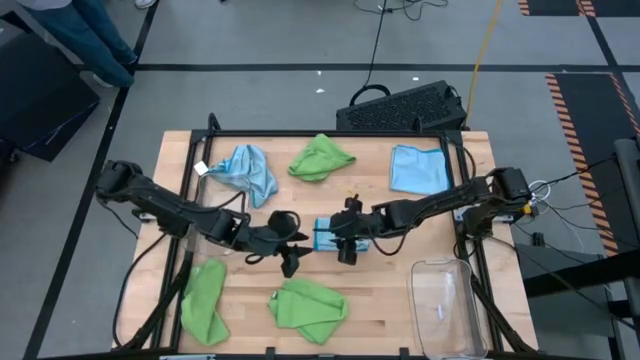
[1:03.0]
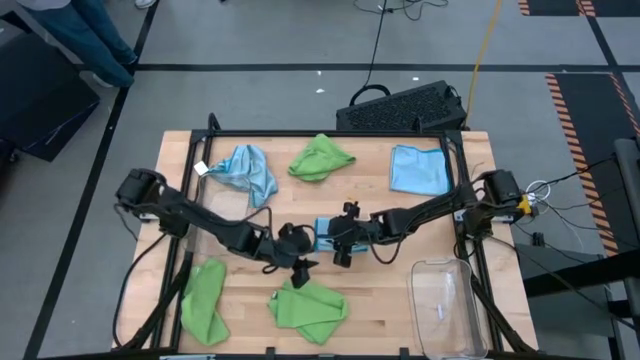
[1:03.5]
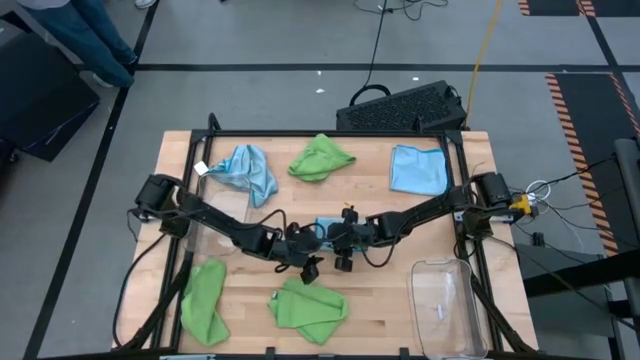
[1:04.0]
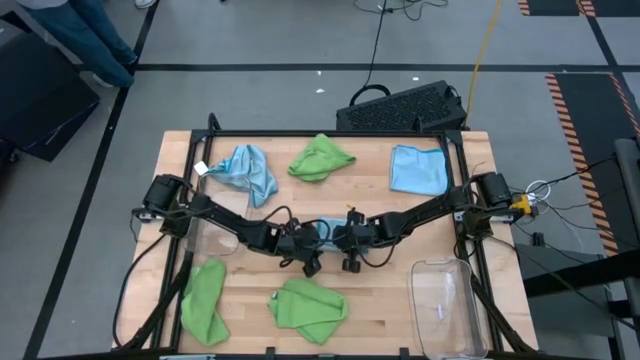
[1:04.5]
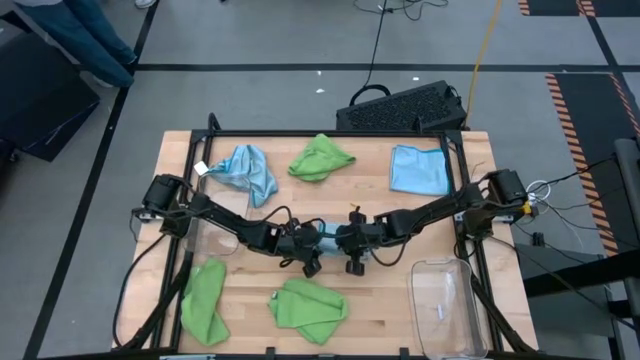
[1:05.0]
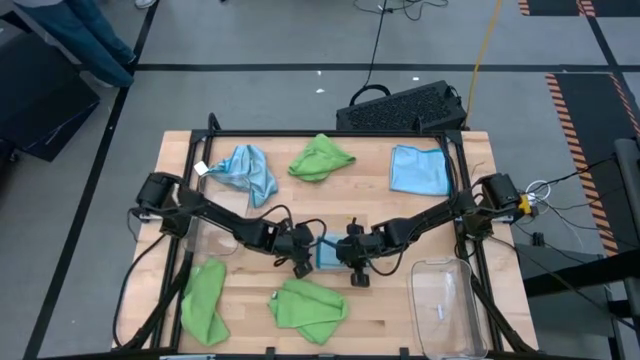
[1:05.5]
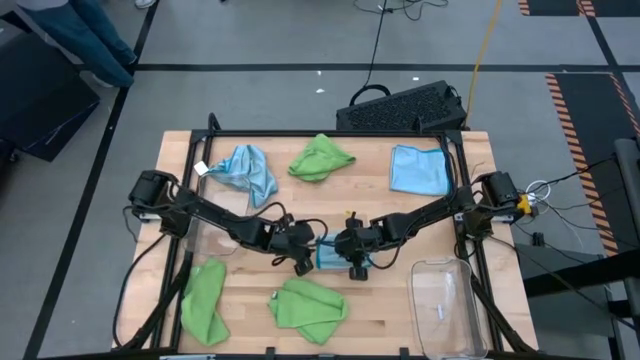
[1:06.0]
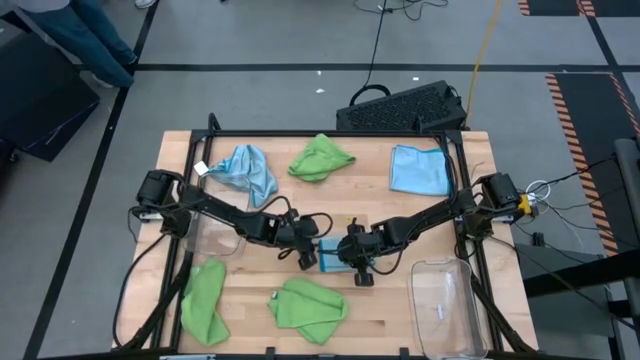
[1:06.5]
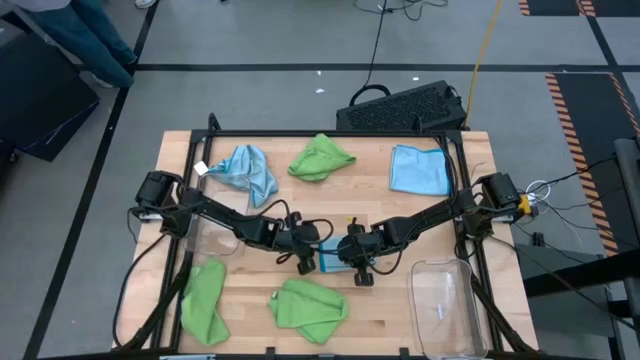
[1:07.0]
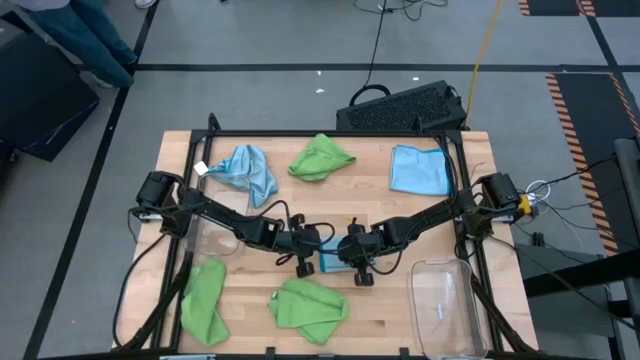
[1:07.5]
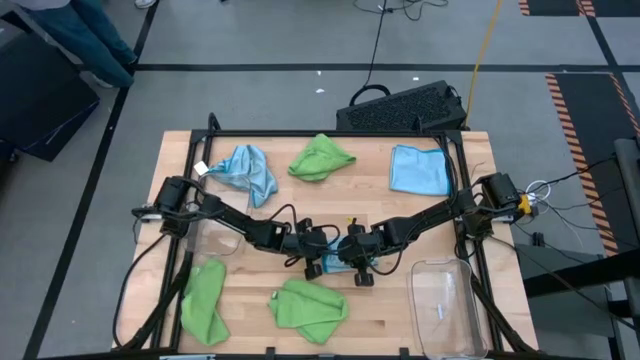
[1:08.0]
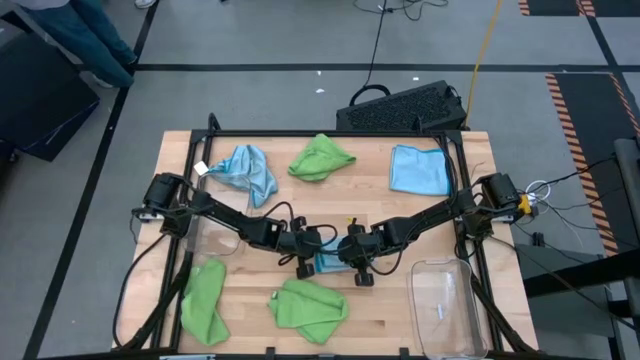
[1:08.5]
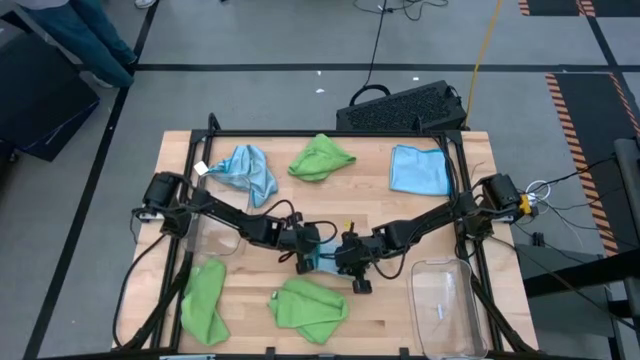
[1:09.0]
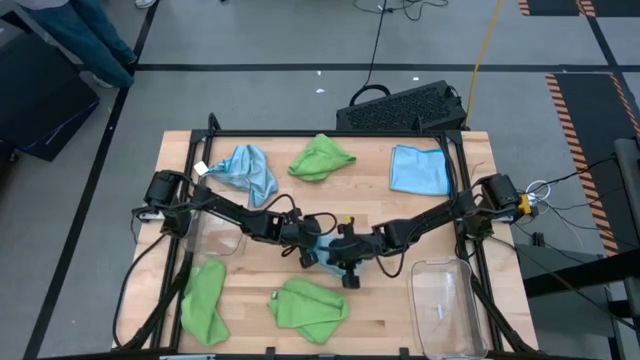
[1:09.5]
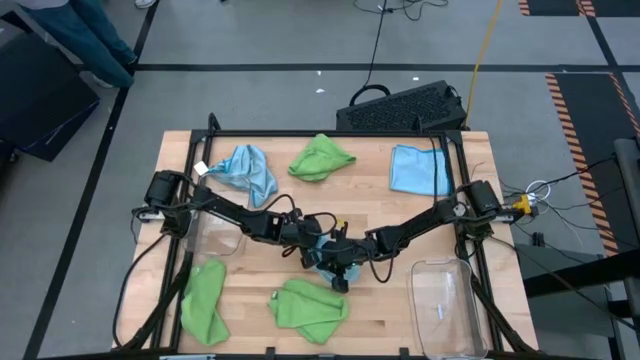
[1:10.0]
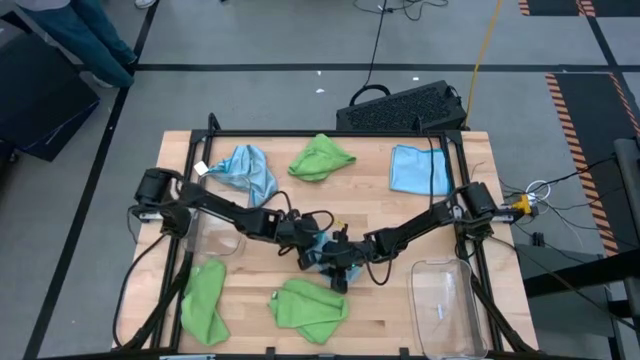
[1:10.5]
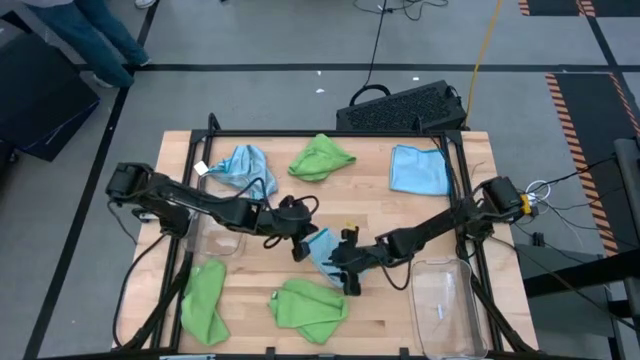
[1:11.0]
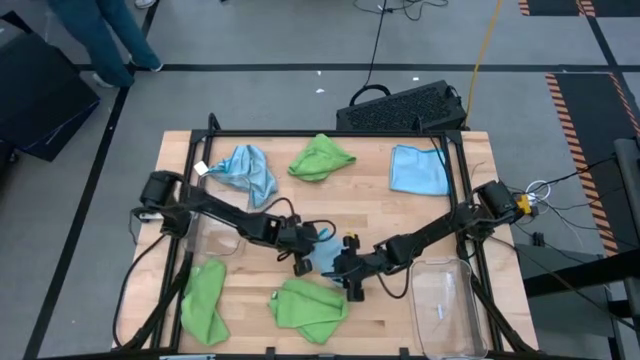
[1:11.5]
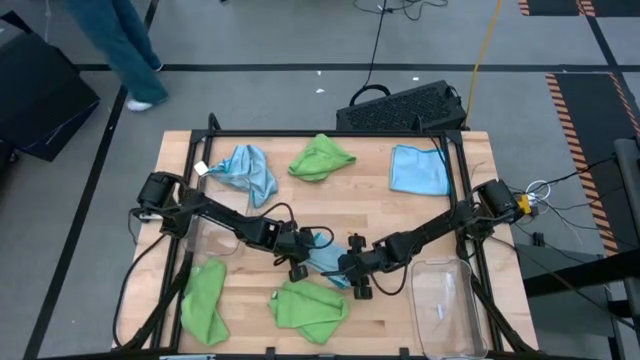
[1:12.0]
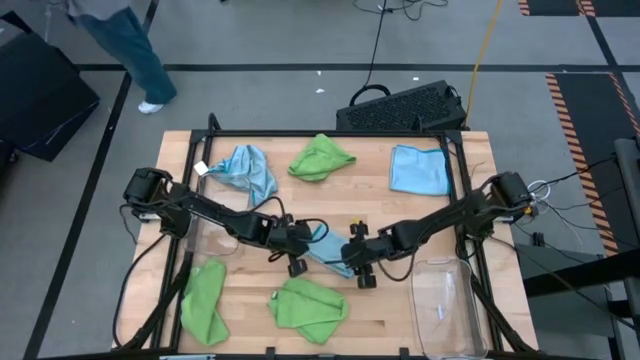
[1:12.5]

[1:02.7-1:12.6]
Task: Sort microfiber towel by color & place in baskets
Fold the bottom blue microfiber towel

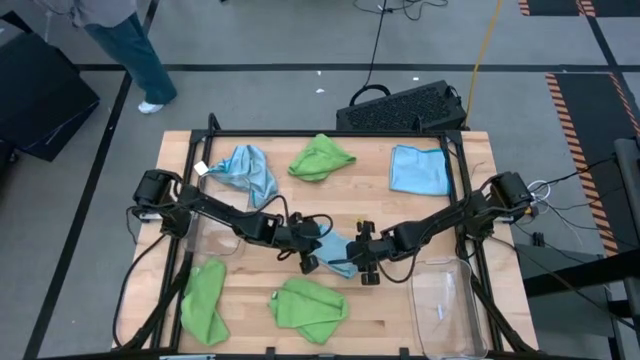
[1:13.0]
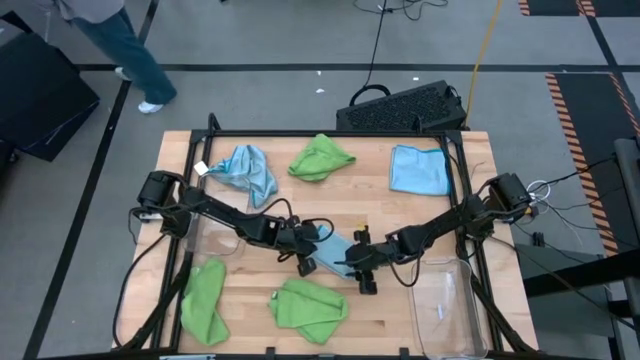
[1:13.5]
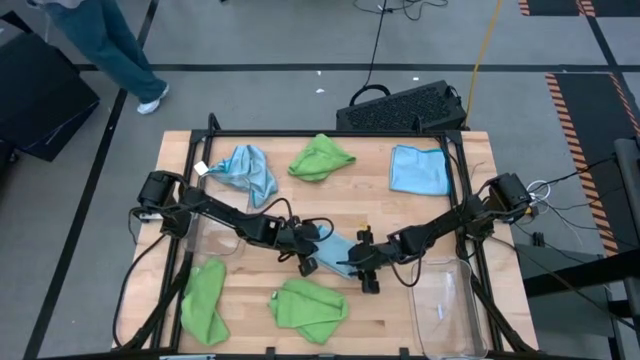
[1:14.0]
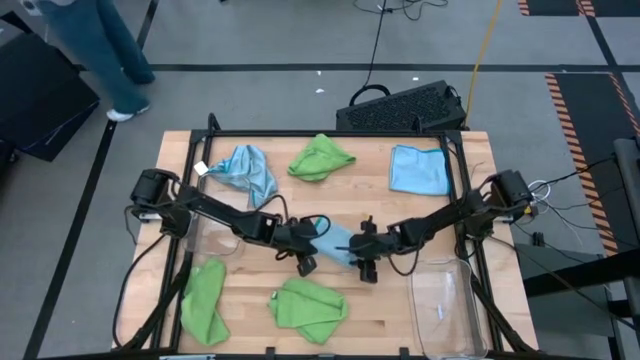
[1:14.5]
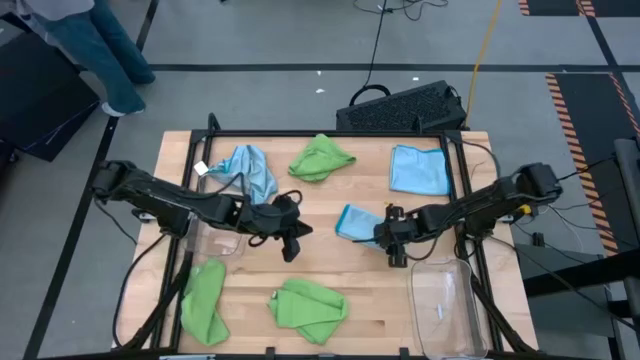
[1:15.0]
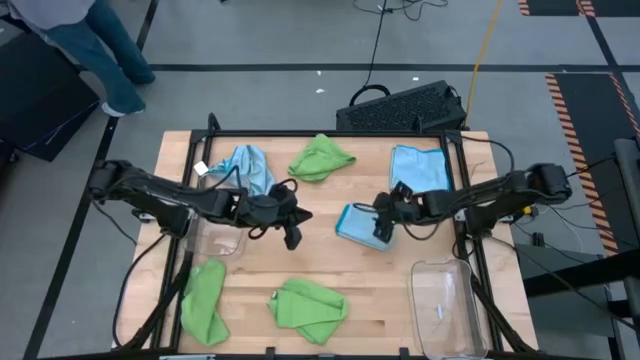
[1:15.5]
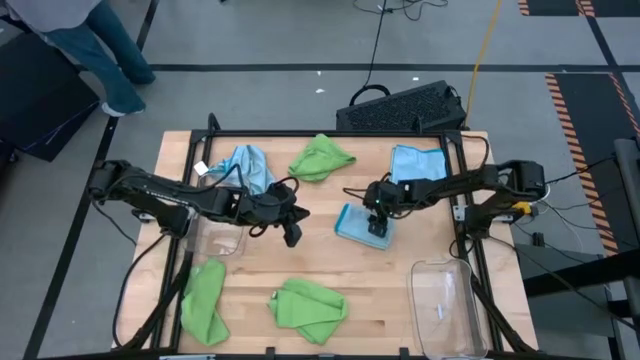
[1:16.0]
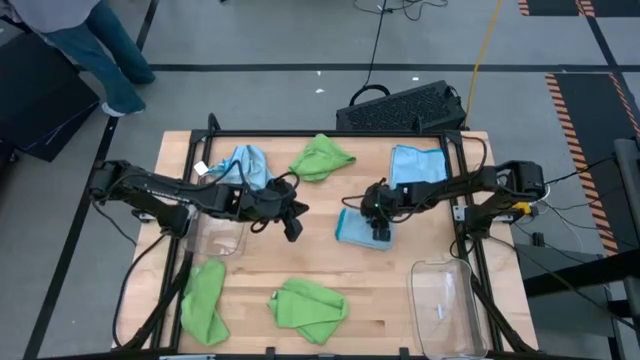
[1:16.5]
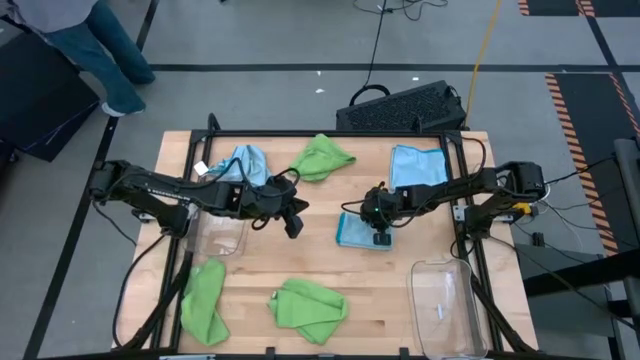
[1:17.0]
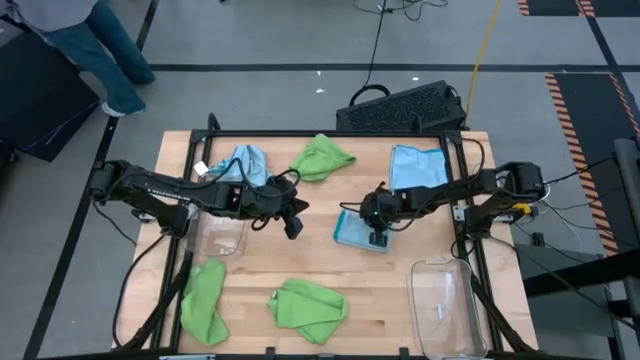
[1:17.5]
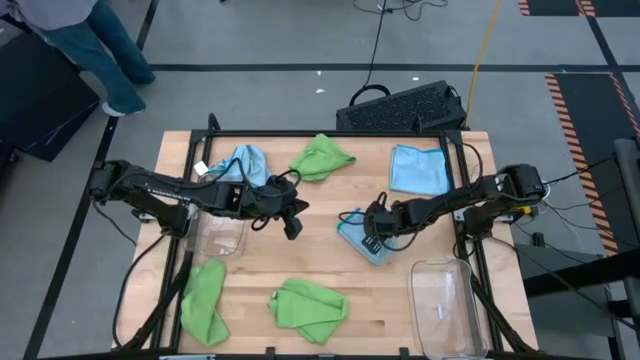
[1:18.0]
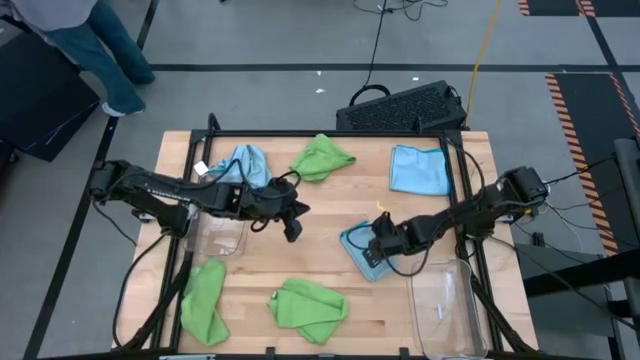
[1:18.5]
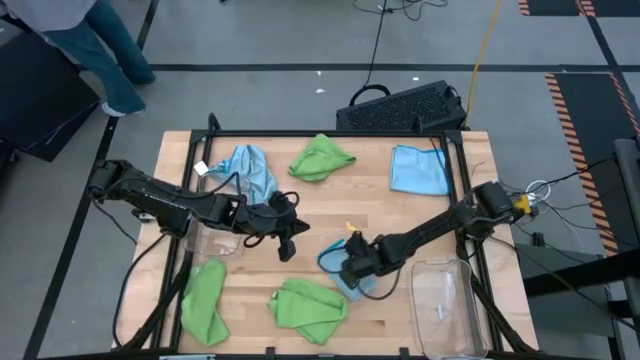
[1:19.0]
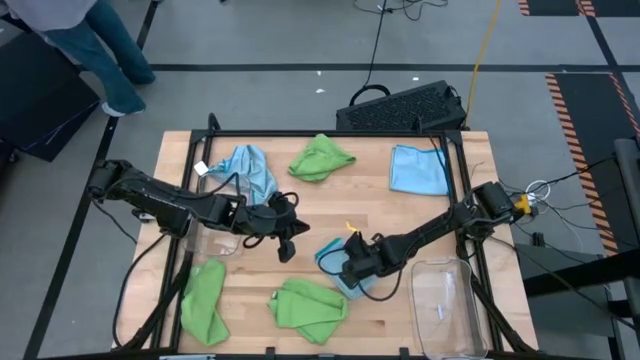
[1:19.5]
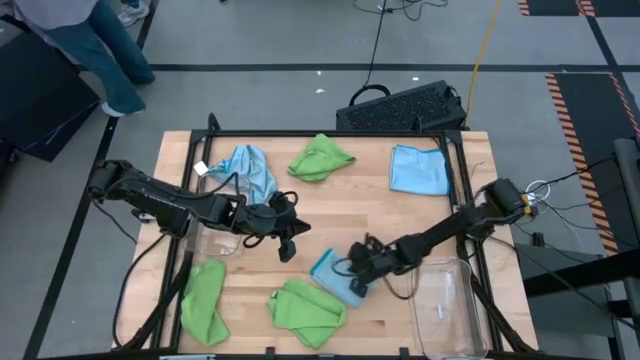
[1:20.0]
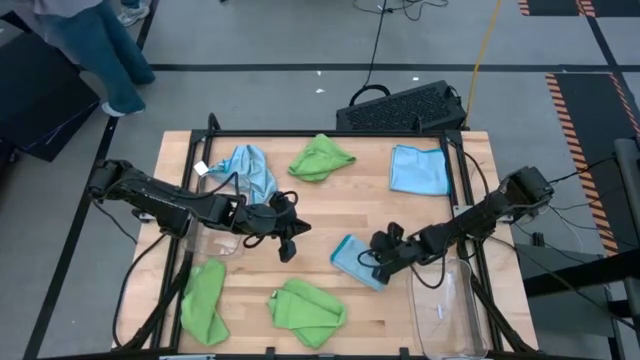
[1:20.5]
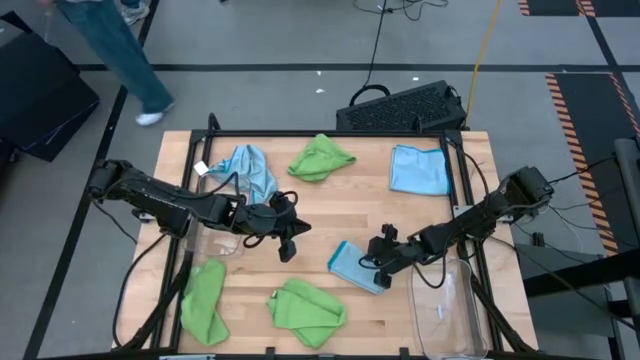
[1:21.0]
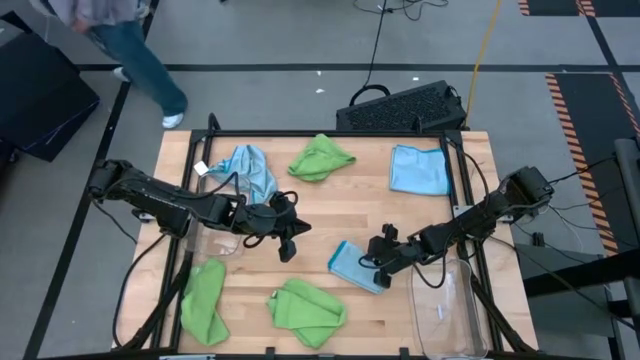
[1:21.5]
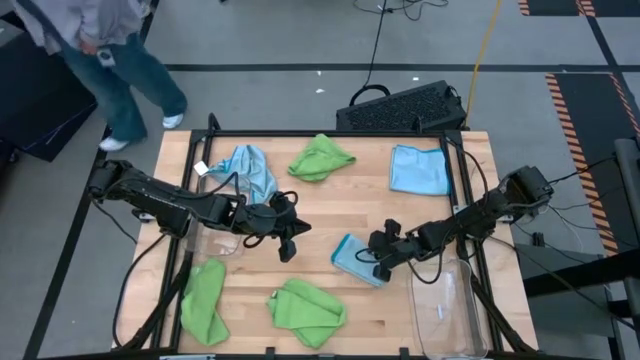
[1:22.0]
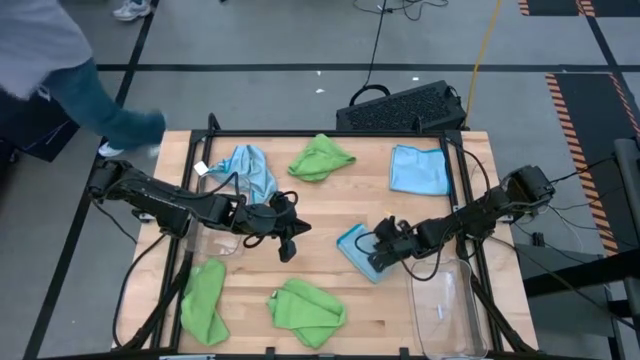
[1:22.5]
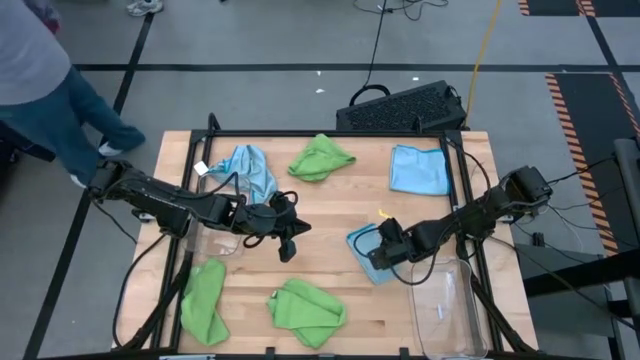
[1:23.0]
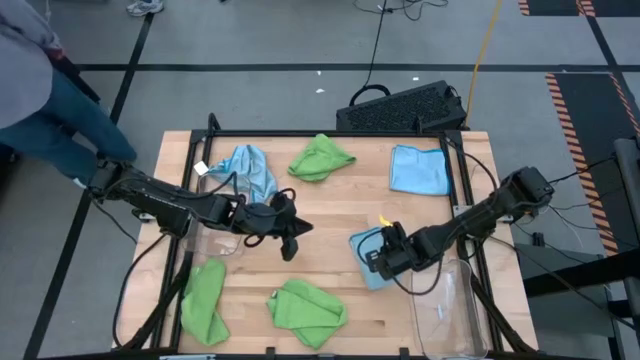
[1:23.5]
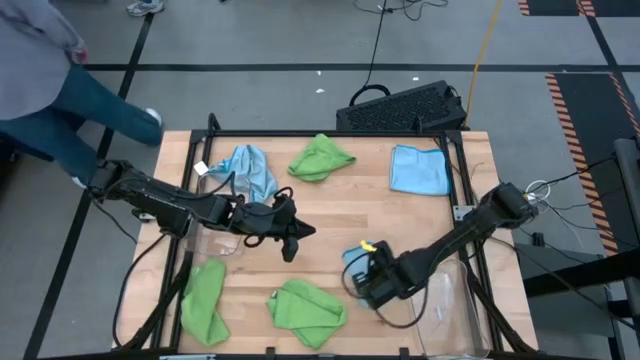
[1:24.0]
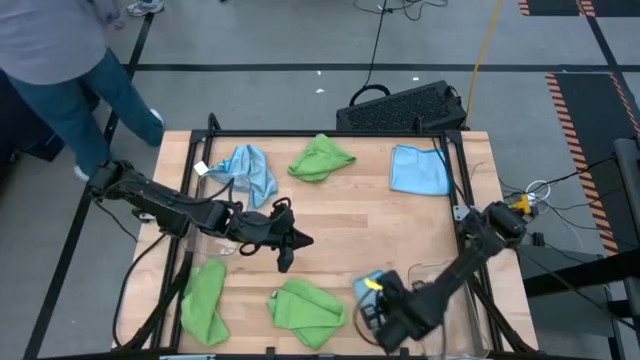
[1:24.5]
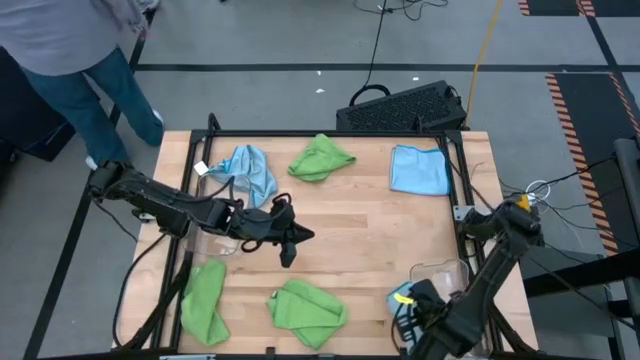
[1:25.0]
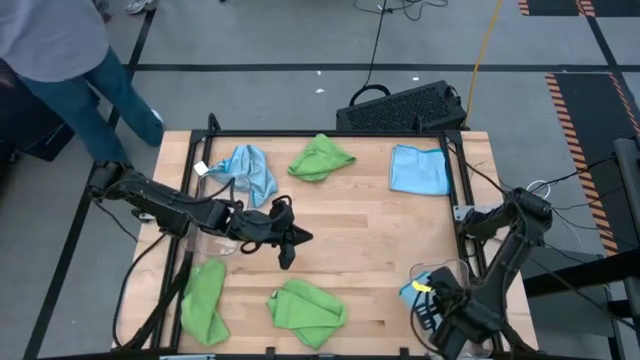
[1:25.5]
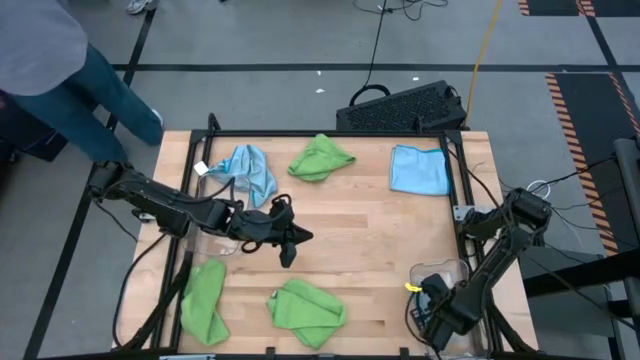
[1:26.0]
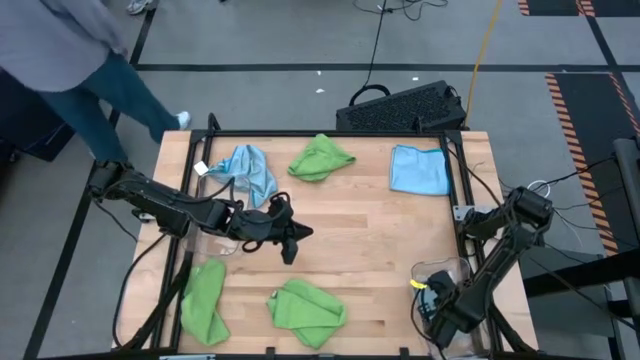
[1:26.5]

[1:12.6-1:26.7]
Put the folded blue microfiber towel into the right transparent bin
